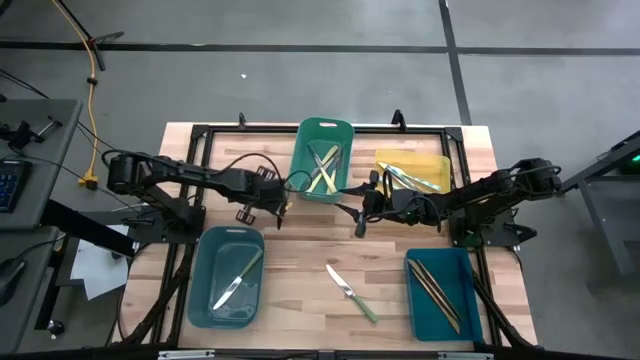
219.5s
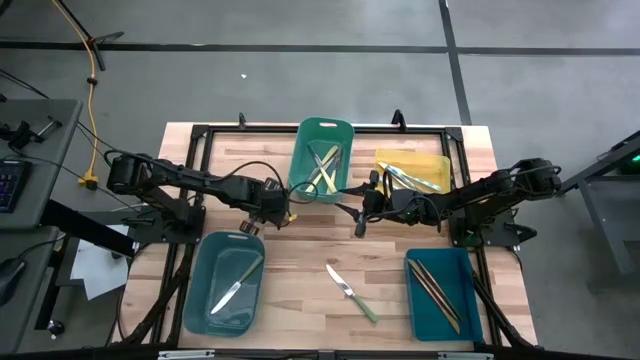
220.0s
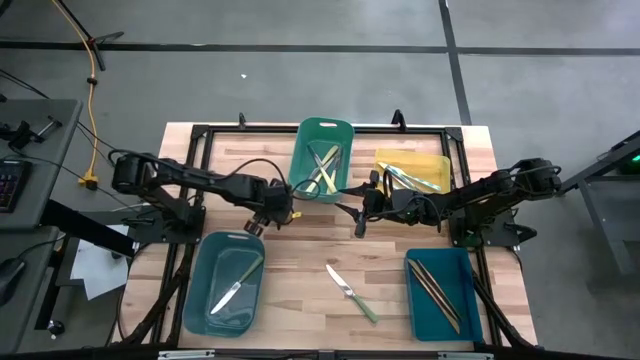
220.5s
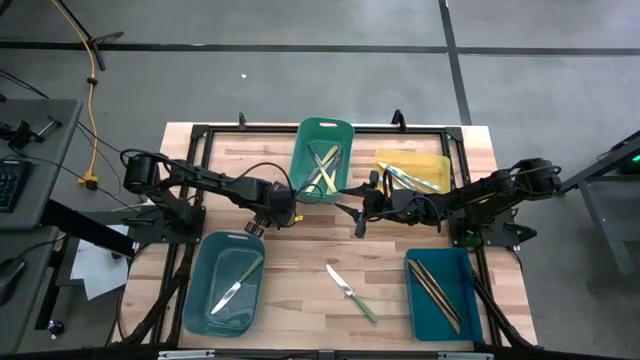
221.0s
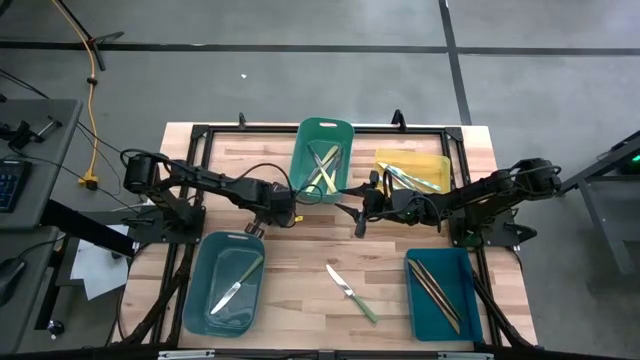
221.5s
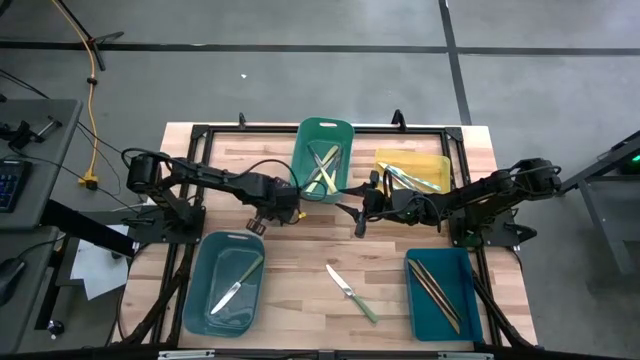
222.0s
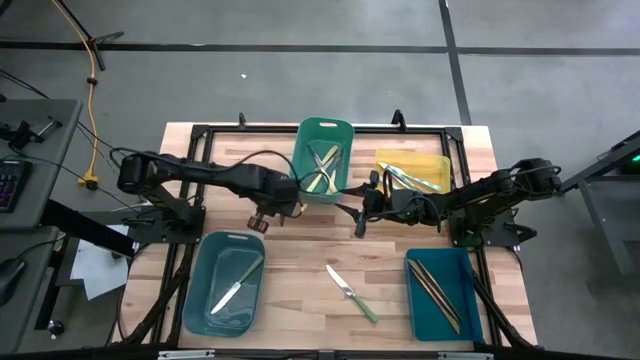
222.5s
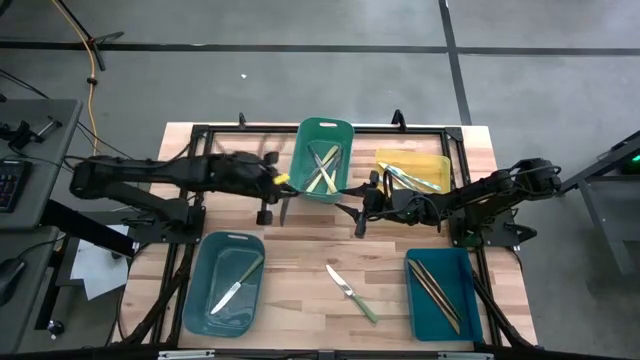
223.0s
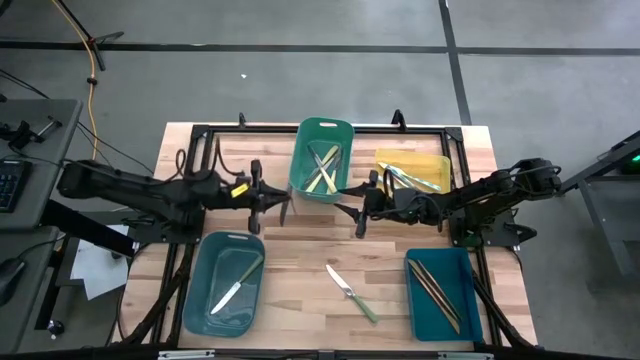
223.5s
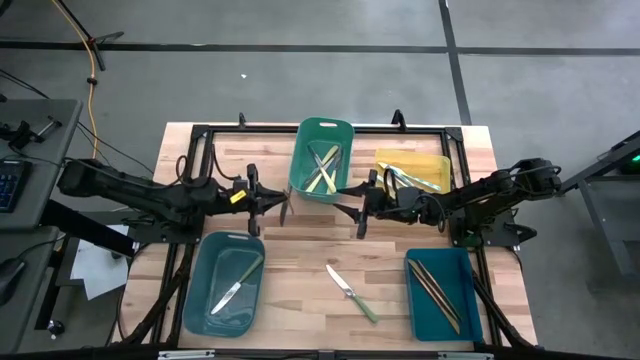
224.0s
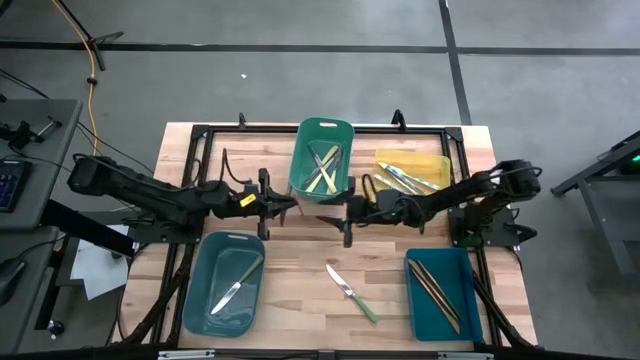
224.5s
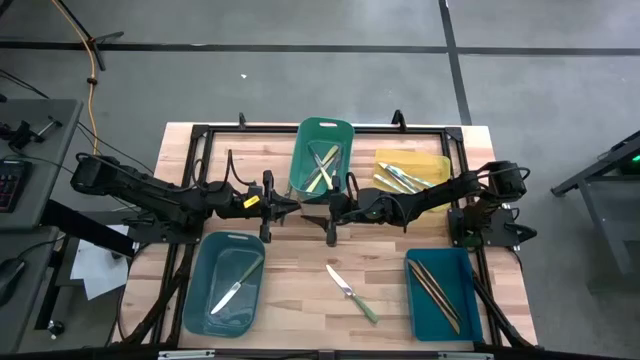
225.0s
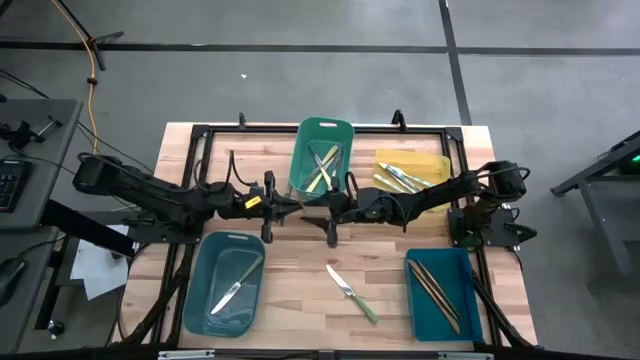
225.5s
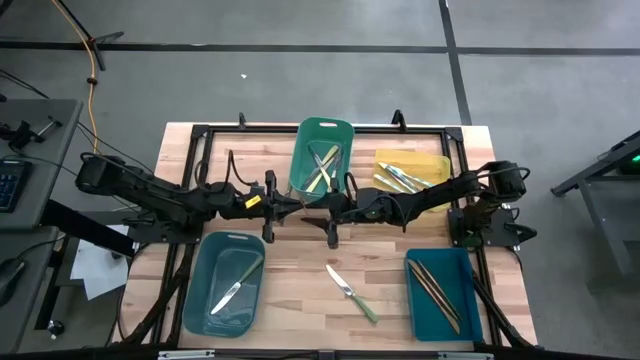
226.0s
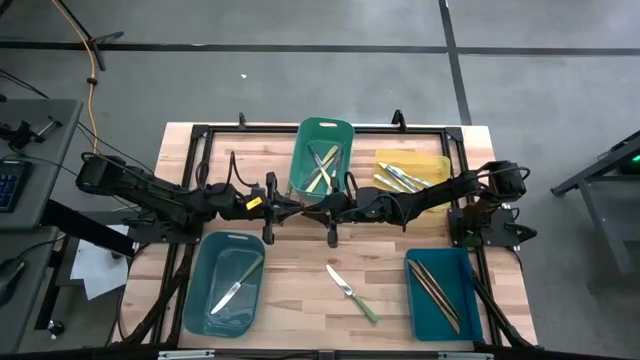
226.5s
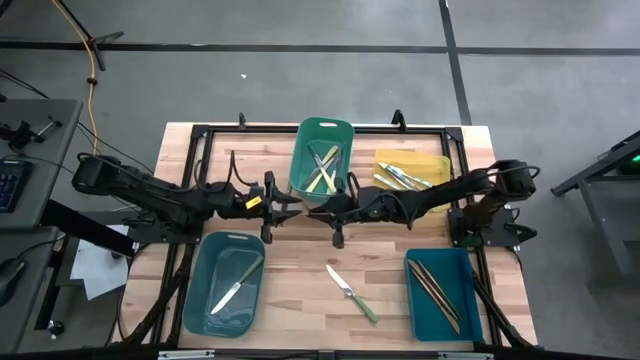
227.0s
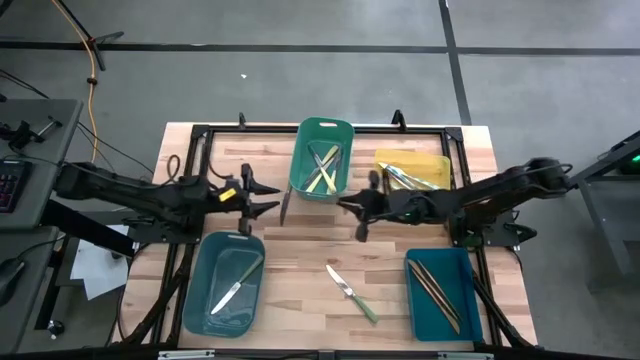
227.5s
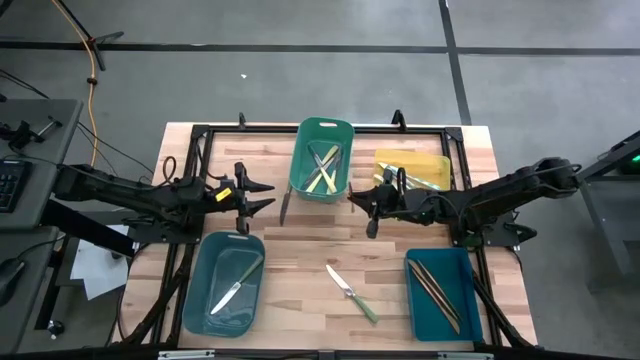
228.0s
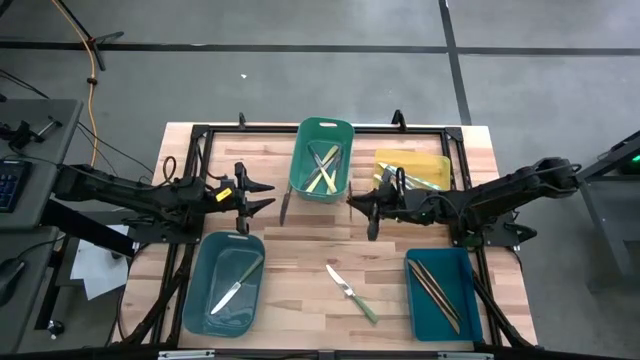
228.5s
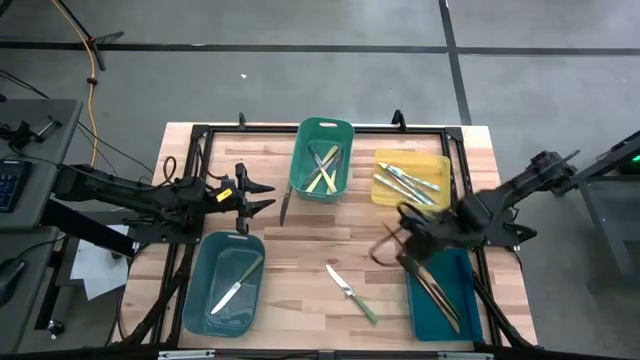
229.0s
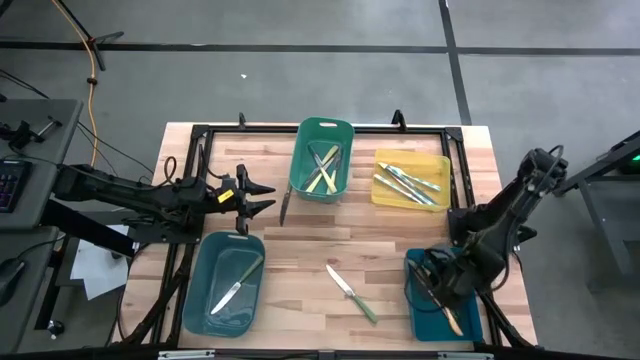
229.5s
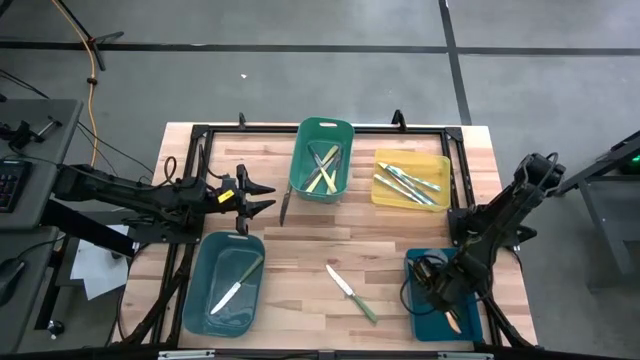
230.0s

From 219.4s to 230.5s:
Task: Sort silverware by color (type)
Put the gold knife into the right blue bin

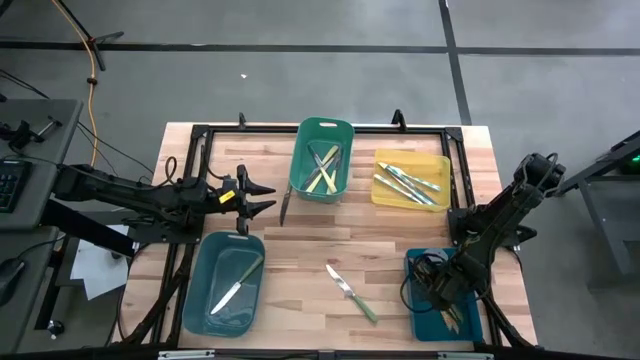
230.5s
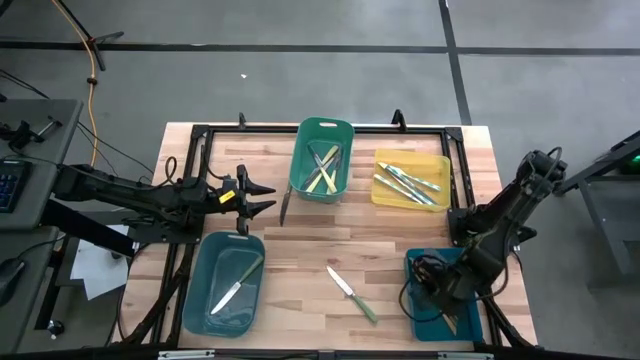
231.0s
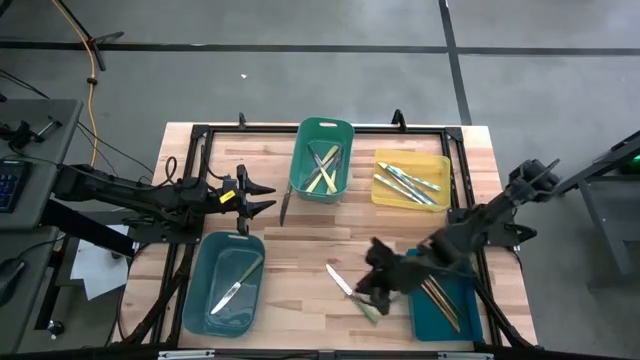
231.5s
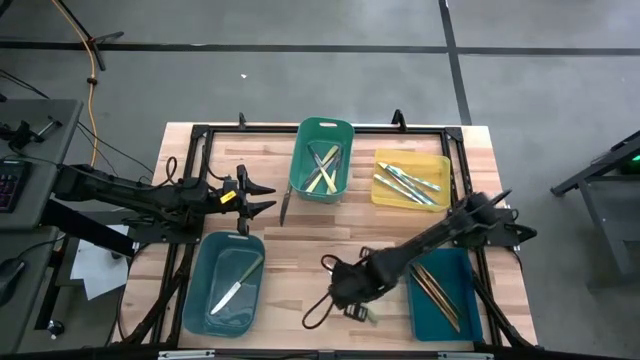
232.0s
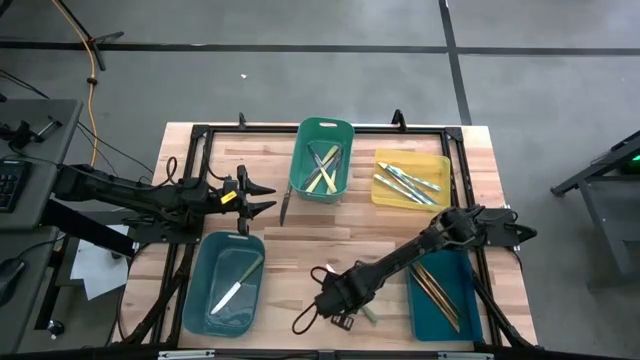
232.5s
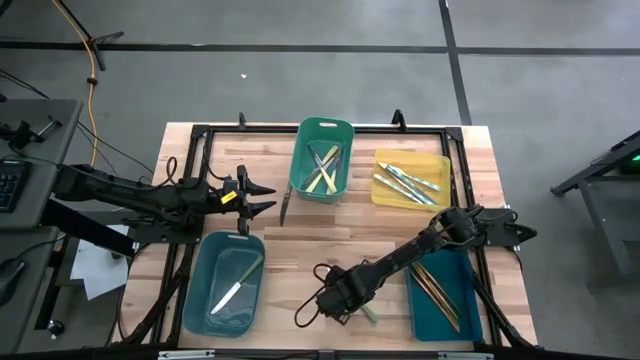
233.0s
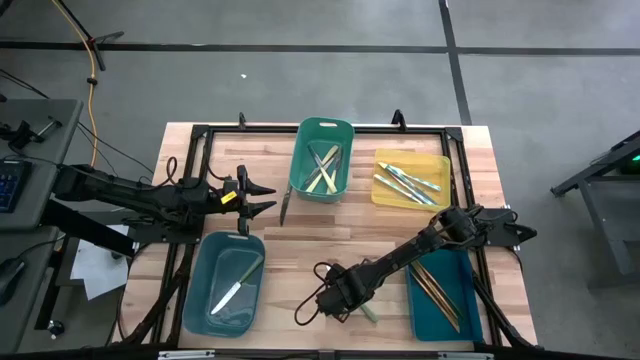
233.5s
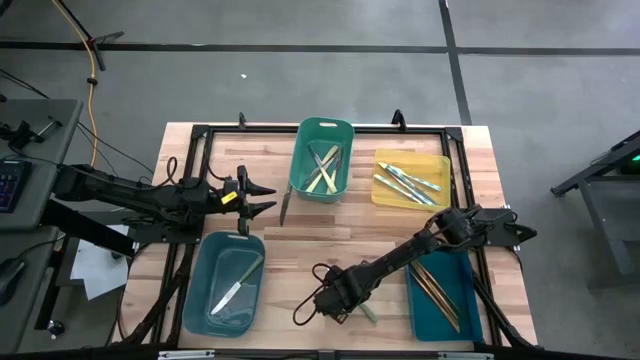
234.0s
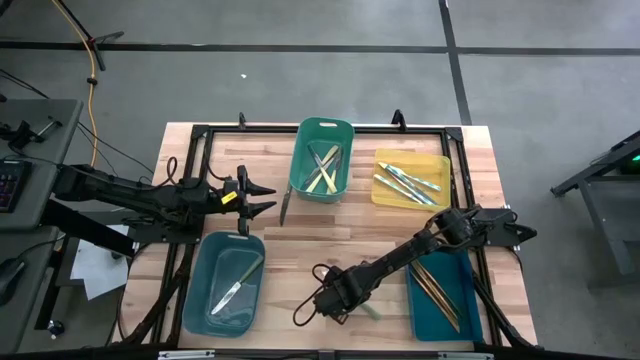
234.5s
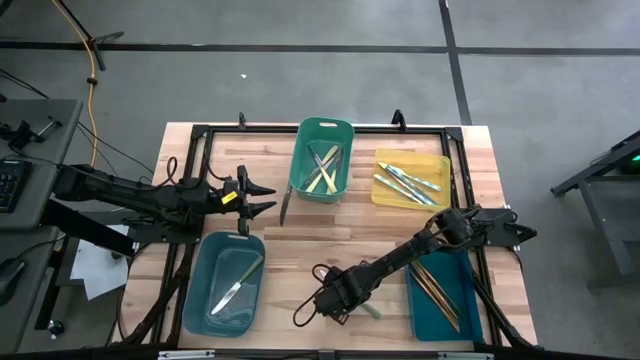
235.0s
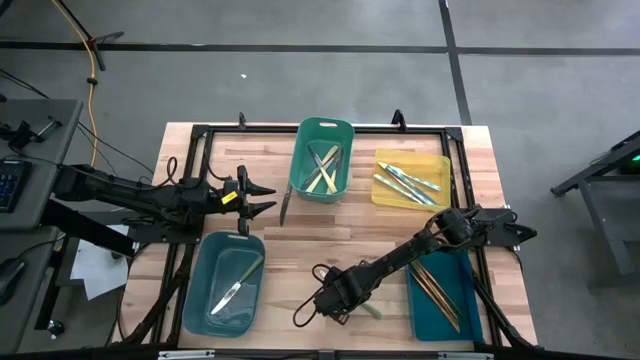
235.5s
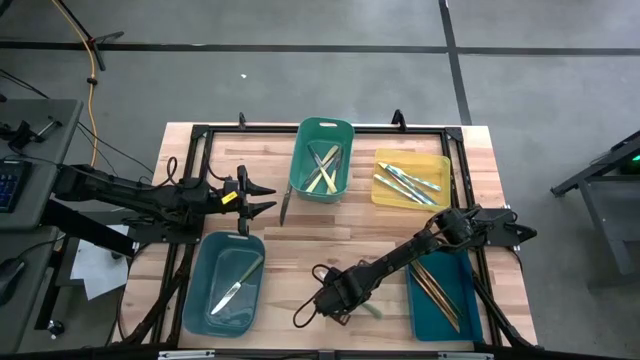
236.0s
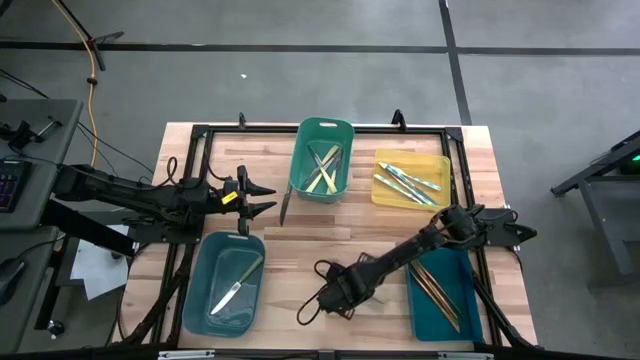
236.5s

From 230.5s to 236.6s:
Put the green knife into the left blue bin
